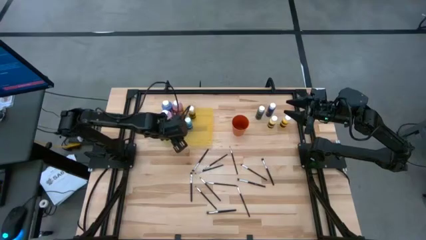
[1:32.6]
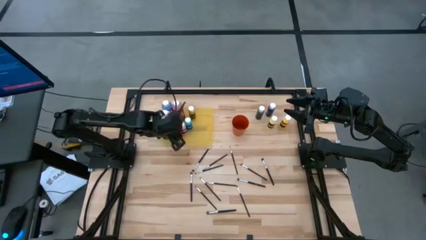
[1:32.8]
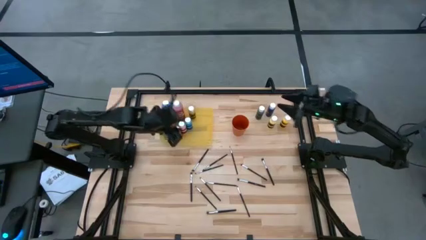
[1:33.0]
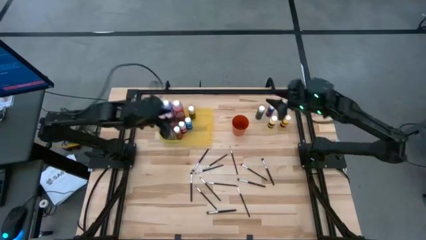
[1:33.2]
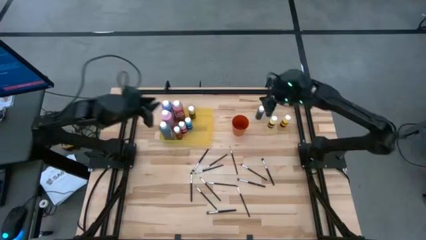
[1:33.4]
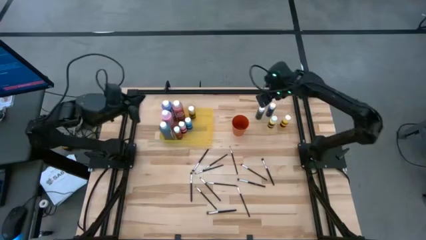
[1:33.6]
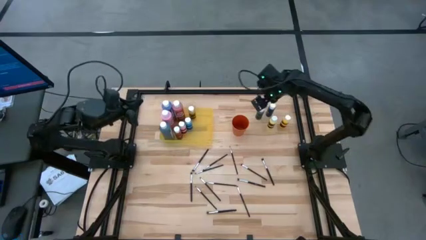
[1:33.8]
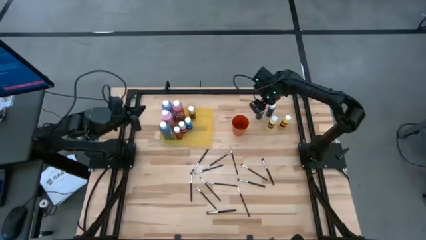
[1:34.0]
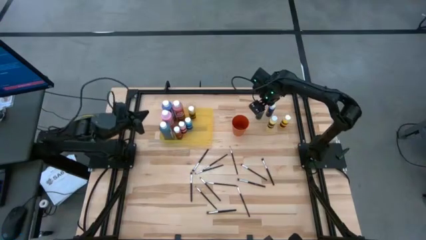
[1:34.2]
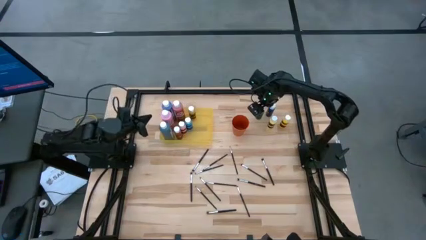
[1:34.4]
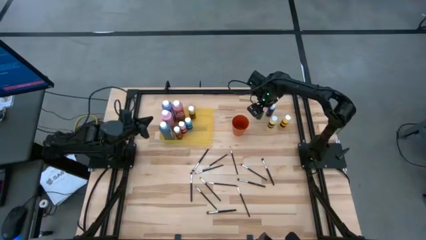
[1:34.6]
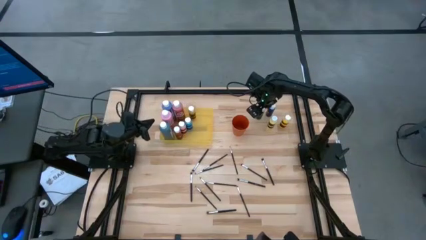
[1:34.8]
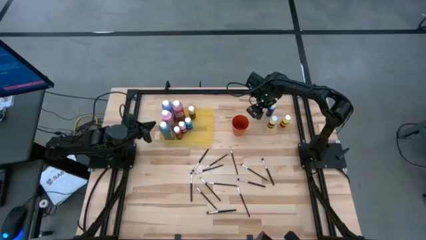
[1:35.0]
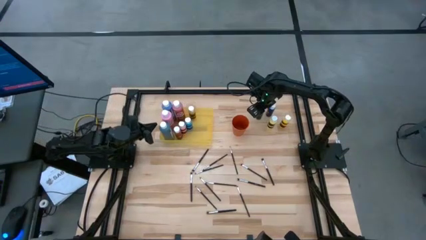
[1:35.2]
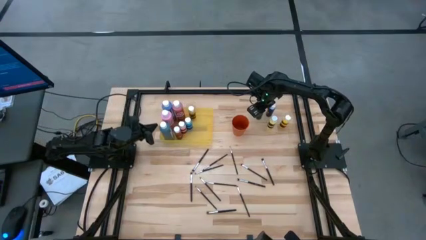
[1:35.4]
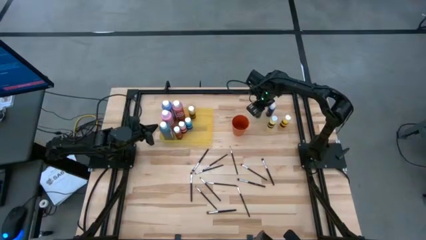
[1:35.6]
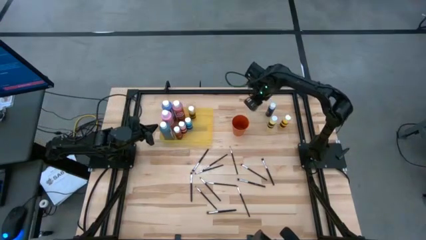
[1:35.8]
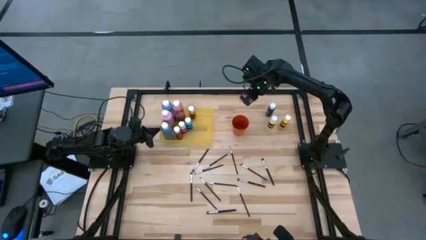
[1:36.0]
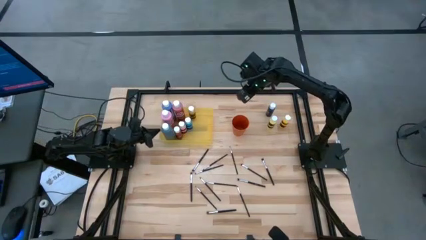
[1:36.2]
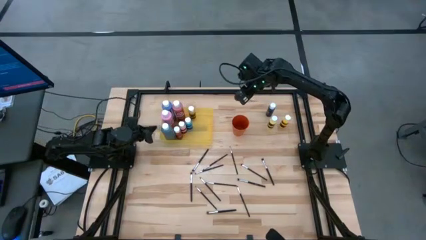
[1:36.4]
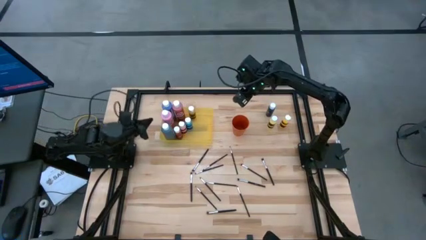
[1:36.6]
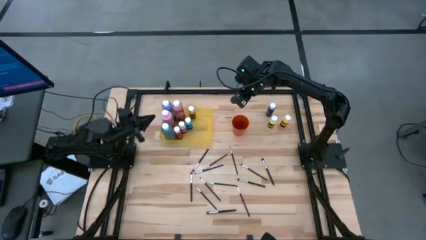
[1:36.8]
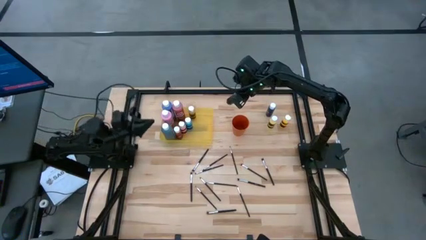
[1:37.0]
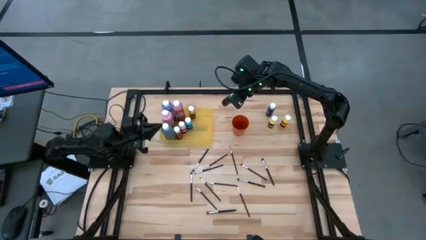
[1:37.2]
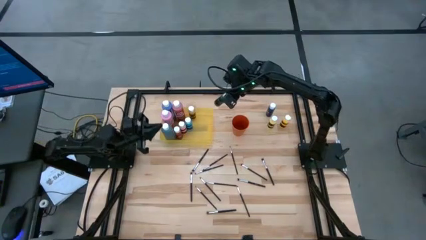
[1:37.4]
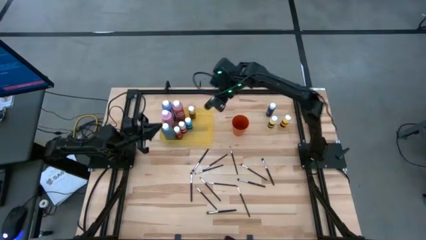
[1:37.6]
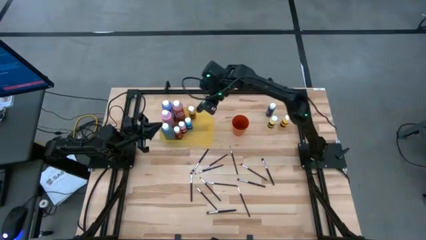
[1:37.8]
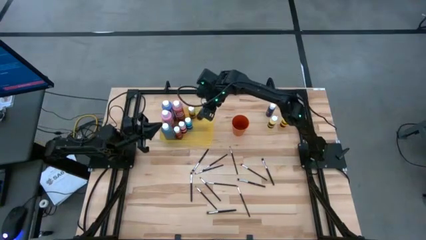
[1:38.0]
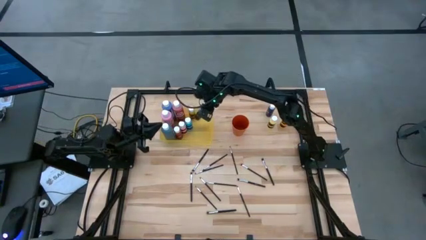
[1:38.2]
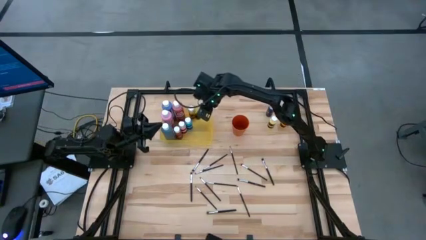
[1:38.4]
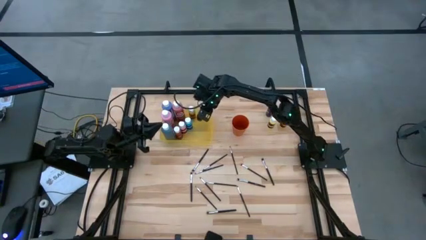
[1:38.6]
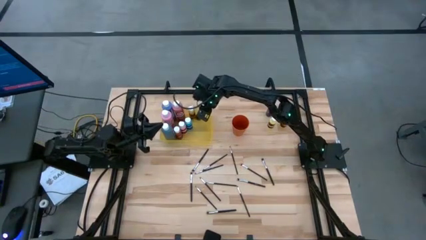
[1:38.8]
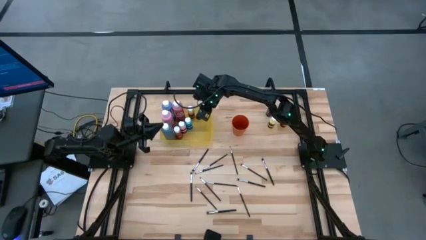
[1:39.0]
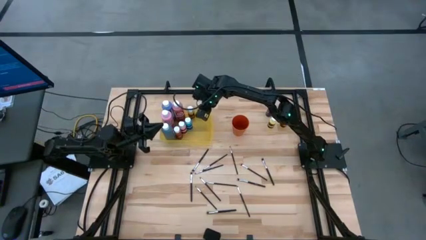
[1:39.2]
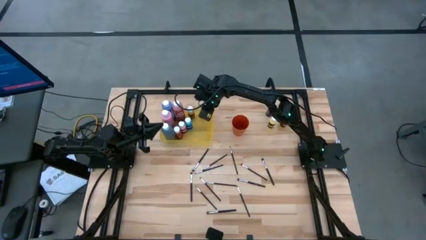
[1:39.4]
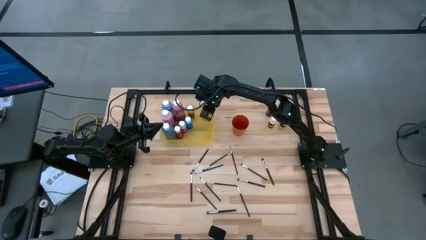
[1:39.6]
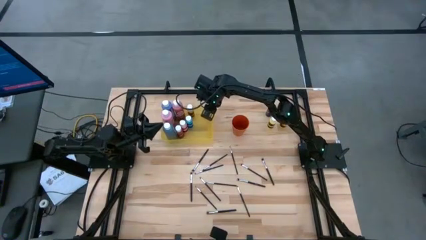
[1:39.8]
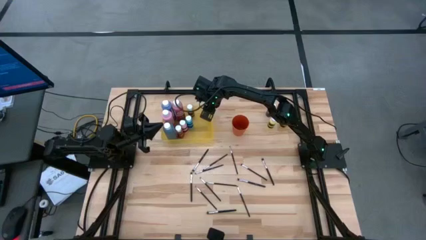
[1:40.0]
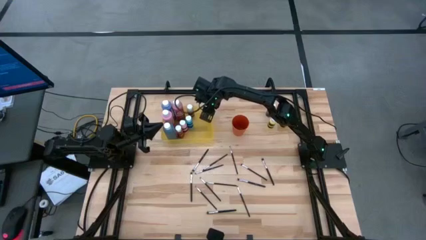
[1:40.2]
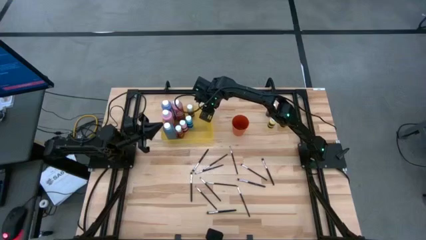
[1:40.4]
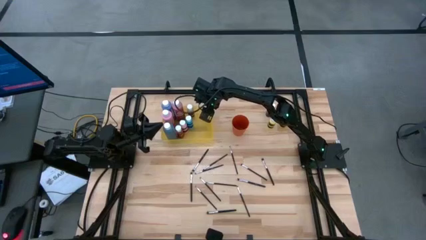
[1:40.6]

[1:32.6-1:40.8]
Task: Pick & Place Paint Supplies
Put the green paint bottle into the yellow bin

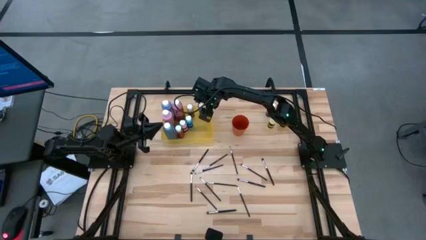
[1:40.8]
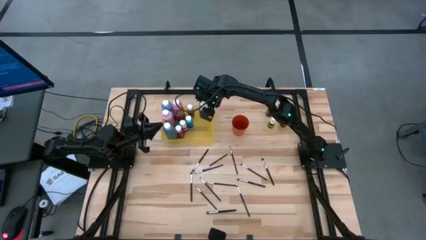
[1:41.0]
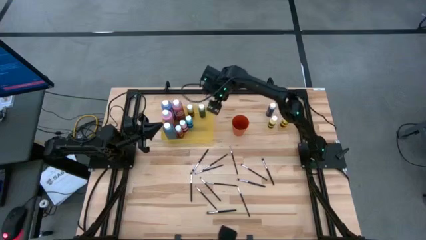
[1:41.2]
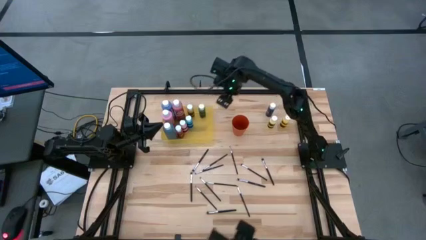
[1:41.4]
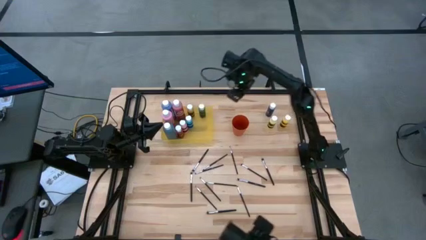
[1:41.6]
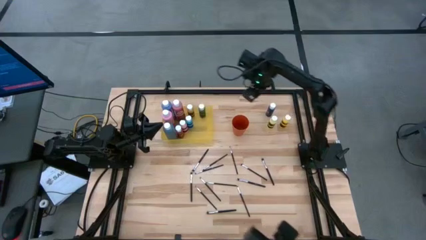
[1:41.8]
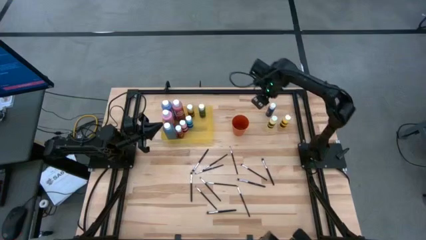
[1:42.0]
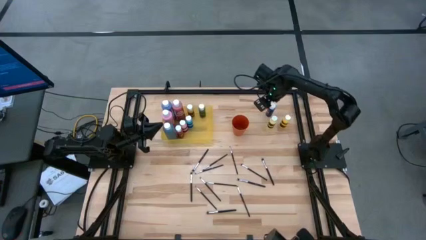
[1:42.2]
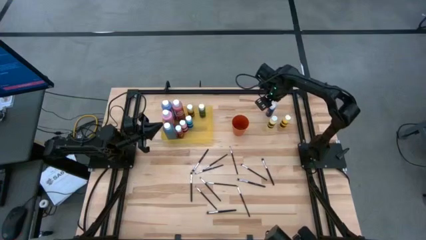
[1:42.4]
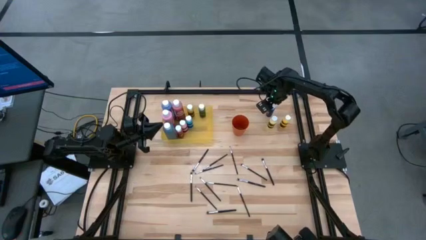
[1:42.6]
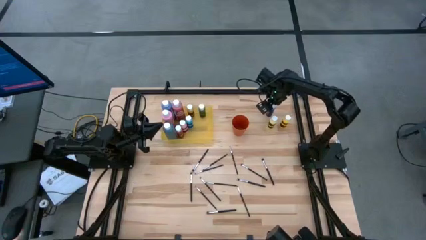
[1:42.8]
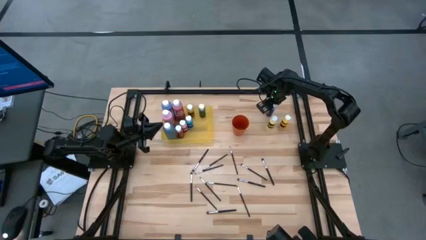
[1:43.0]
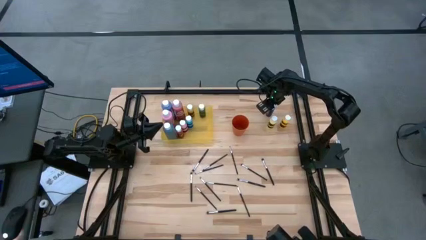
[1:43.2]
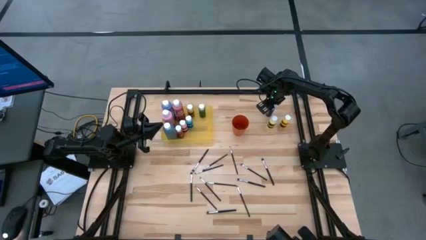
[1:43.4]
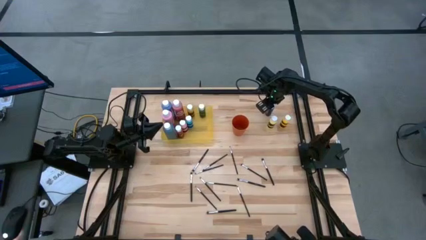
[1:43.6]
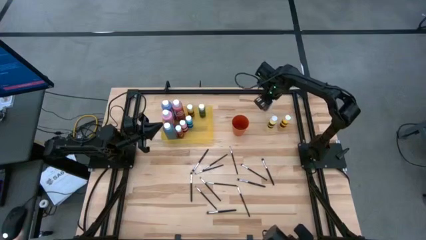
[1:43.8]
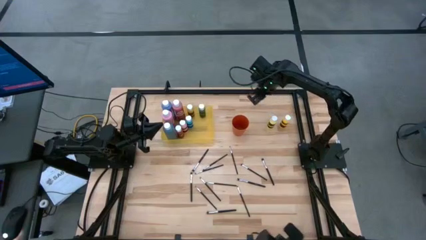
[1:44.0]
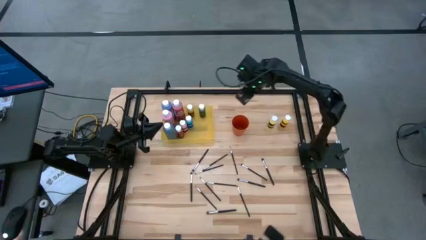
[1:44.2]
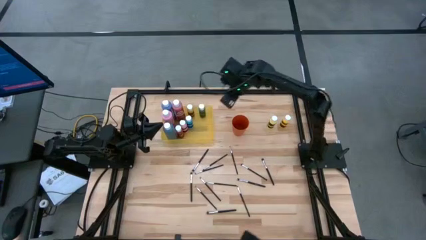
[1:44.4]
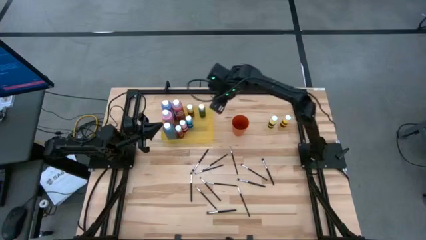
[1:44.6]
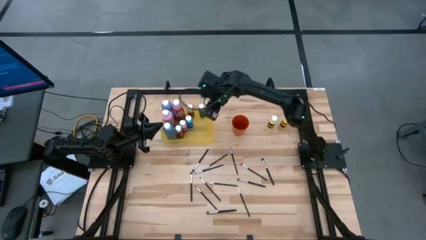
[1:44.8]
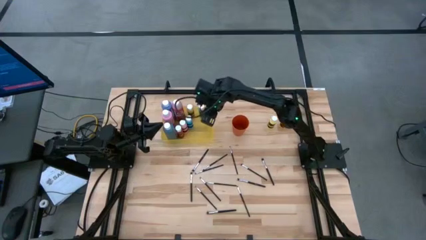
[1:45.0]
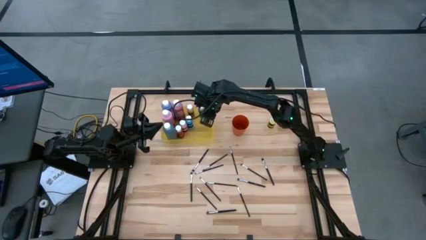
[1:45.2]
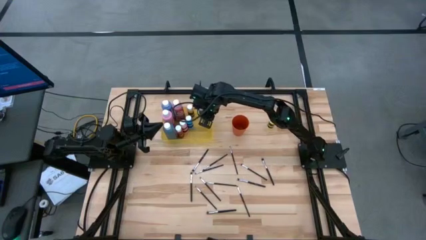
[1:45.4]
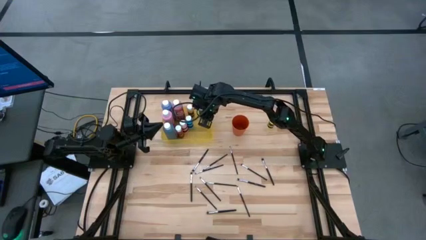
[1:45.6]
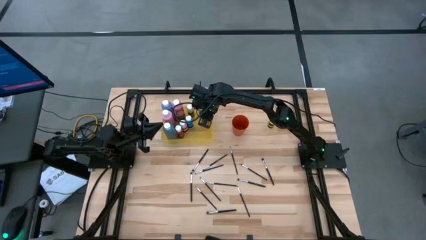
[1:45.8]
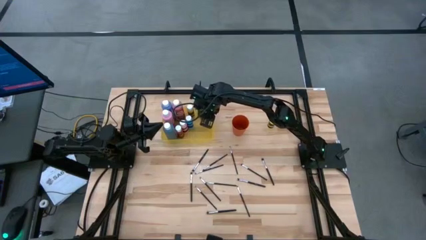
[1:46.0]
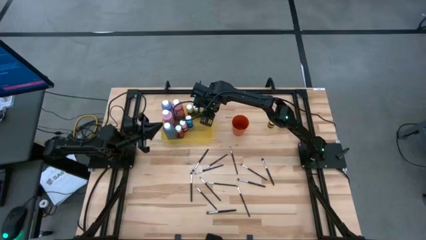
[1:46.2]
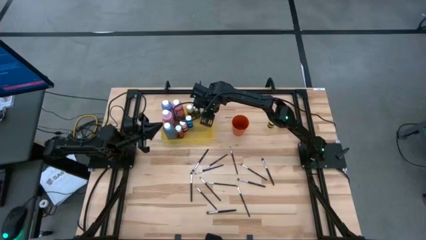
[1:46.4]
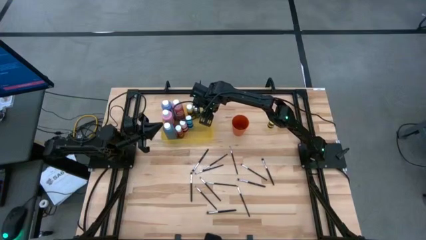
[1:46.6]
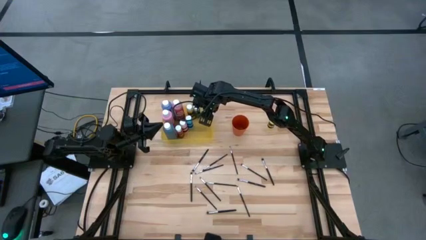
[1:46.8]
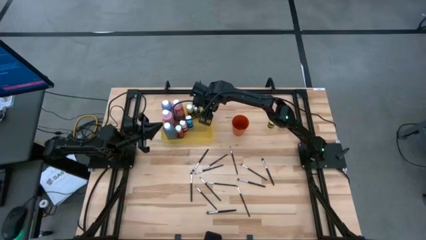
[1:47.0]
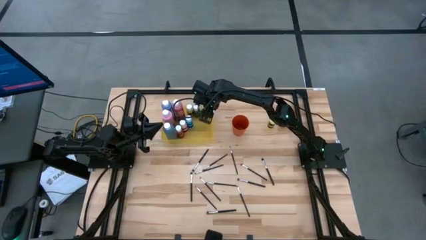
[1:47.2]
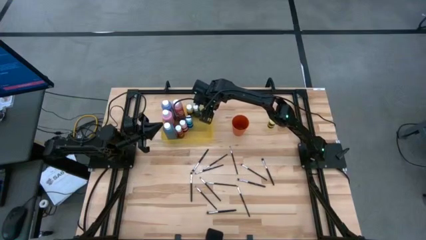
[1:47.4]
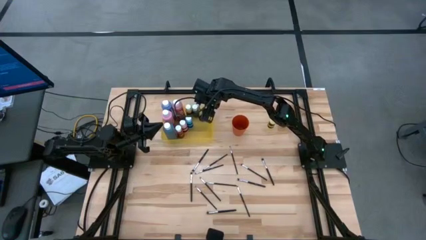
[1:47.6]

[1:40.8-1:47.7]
Put the dark blue paint bottle into the yellow bin
